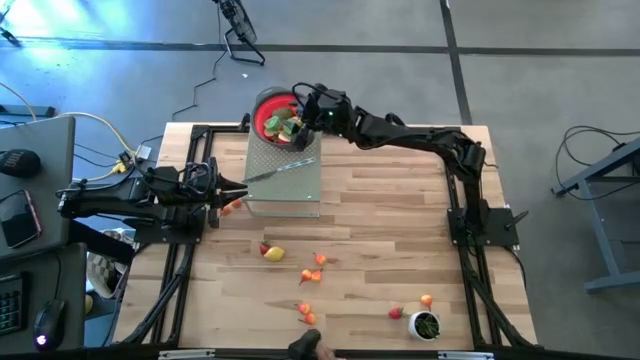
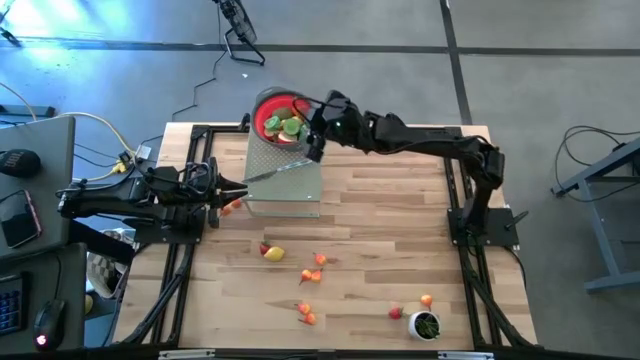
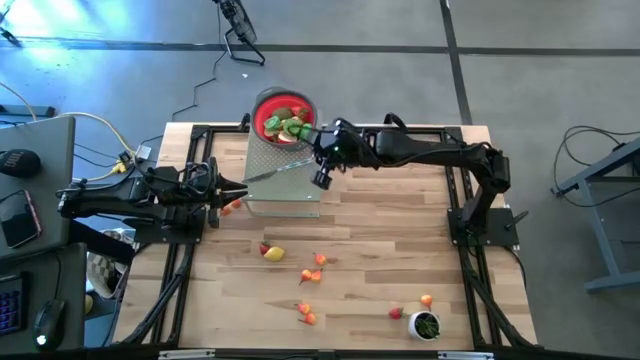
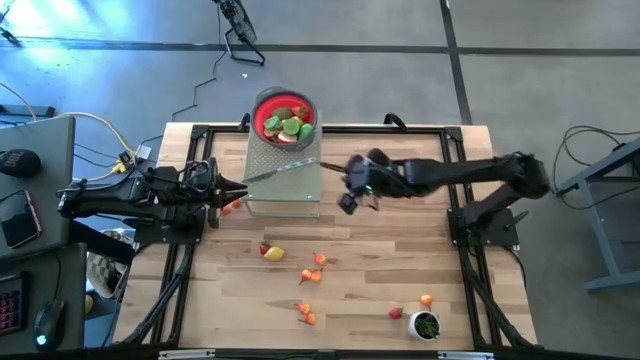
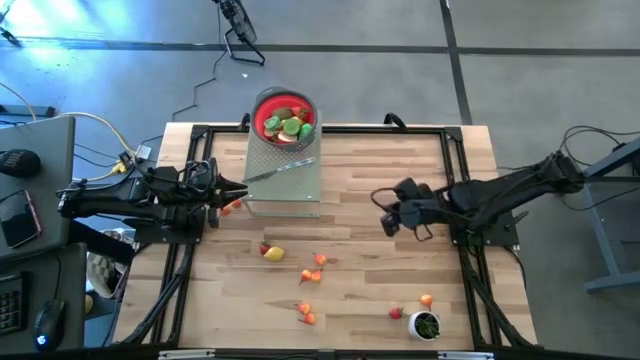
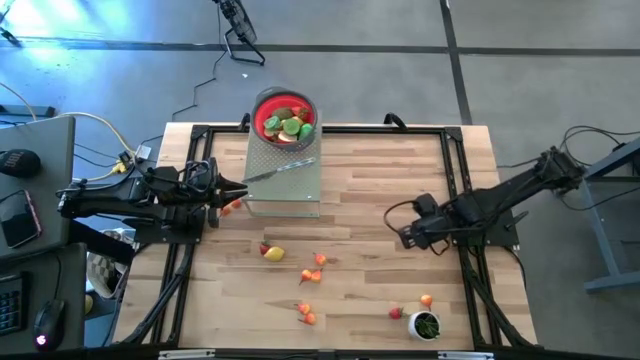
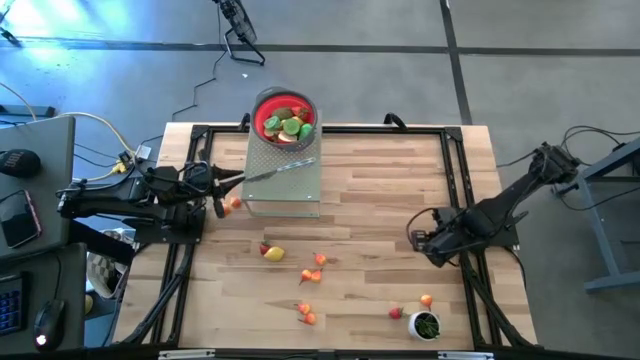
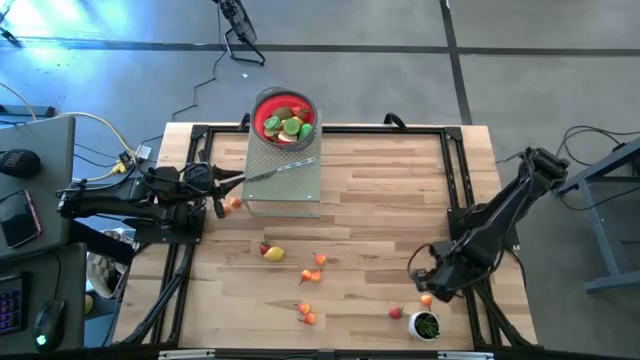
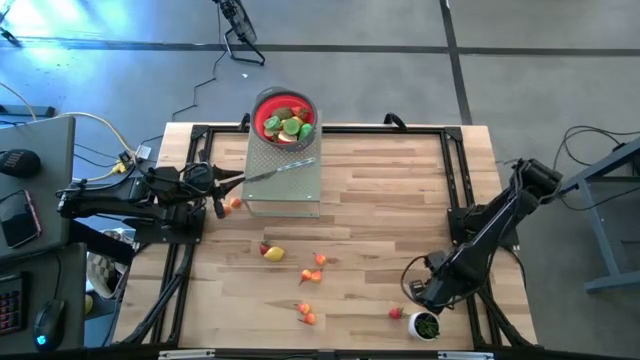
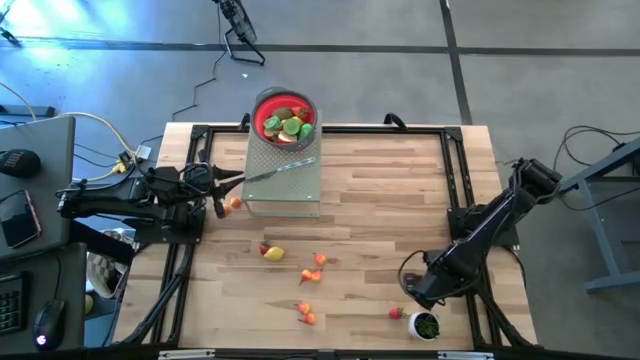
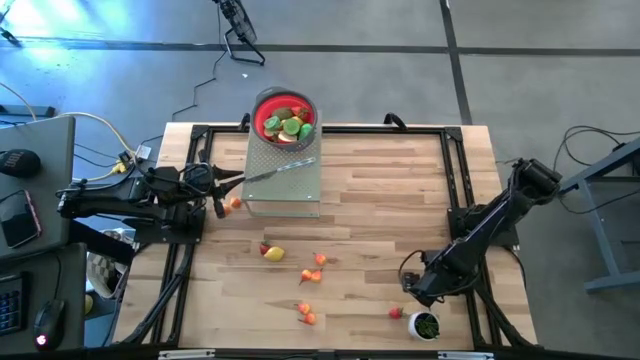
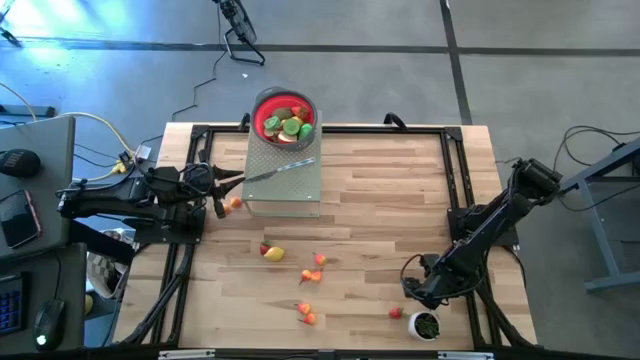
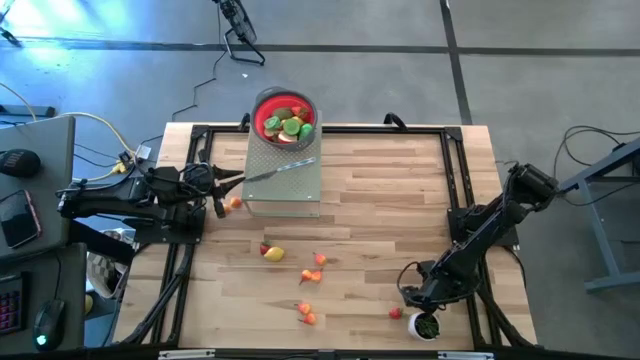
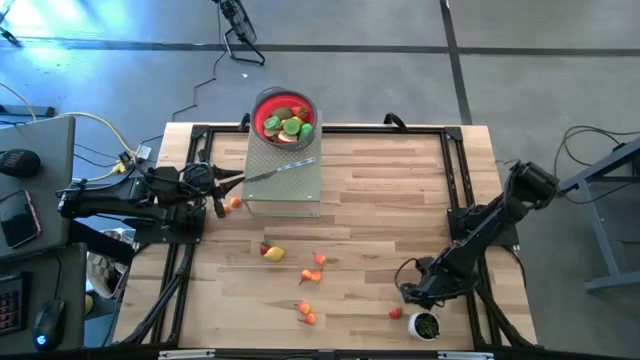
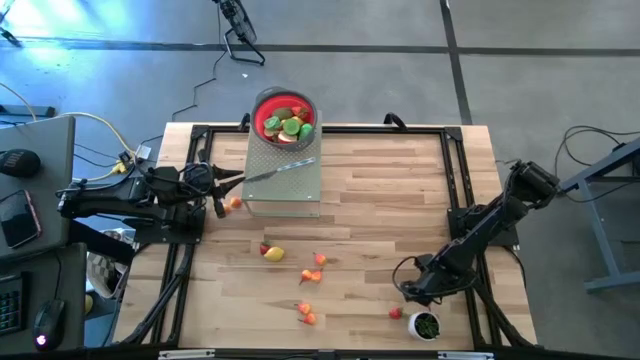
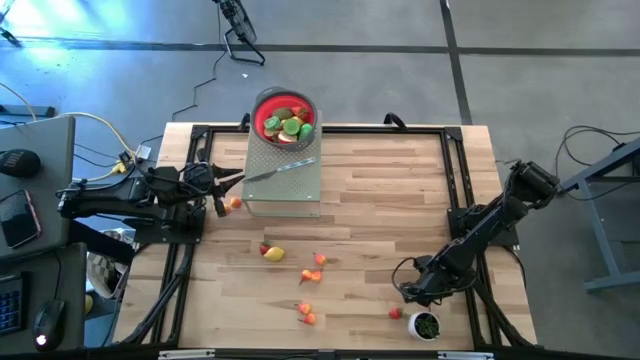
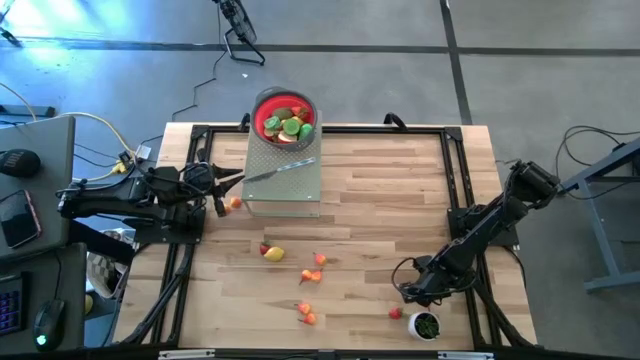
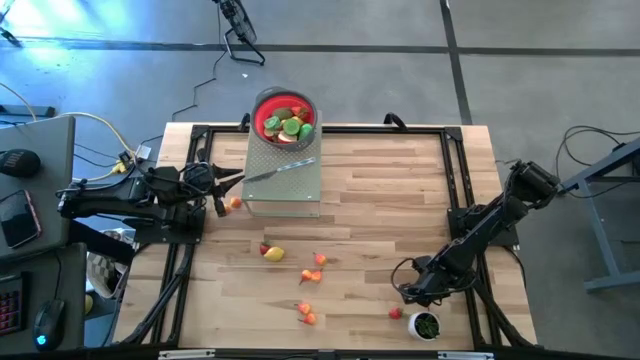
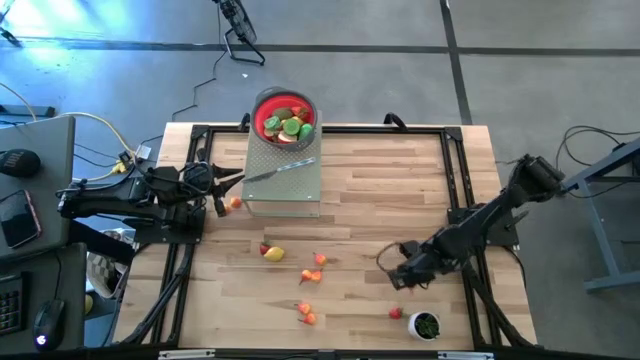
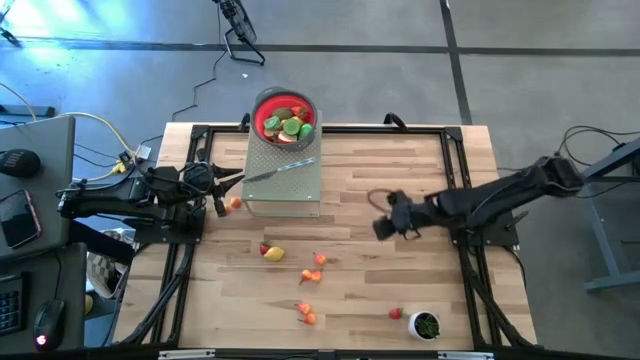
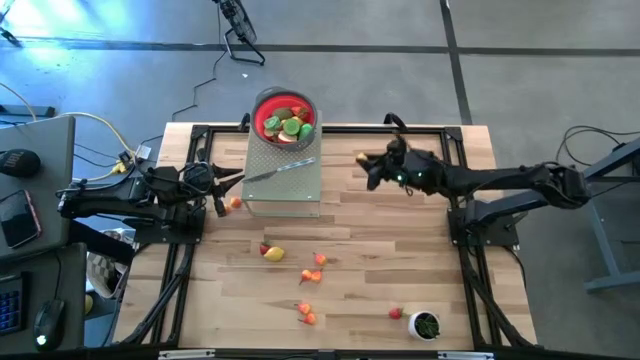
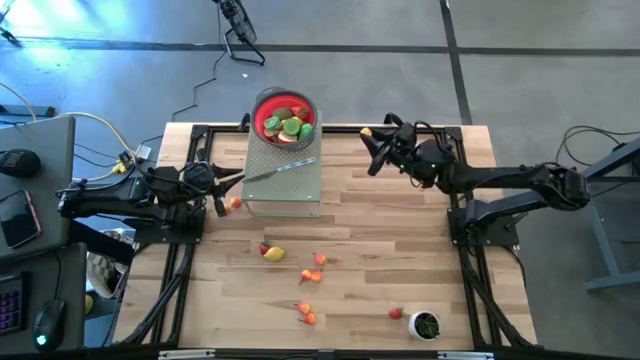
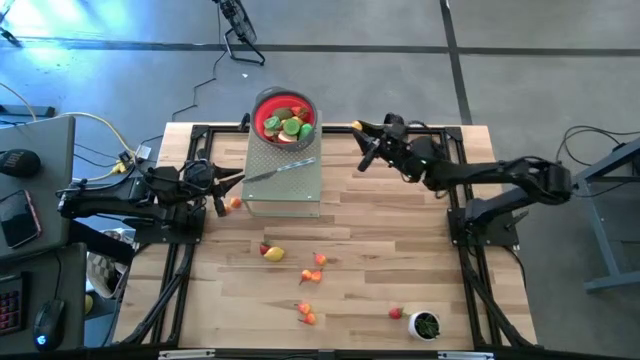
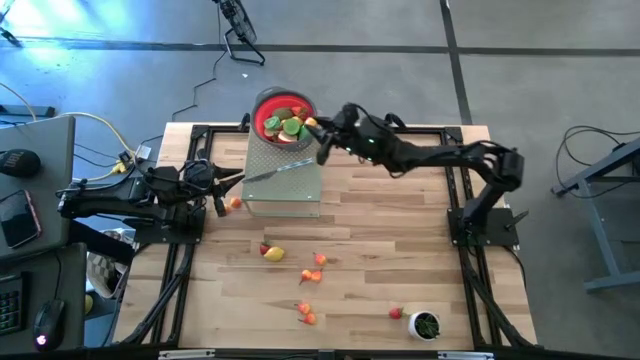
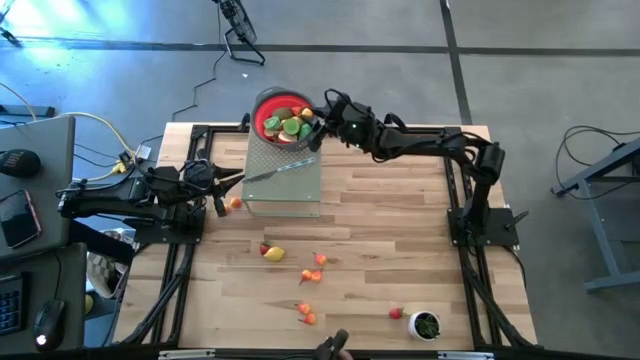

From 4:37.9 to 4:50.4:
Task: Pick & Place Fruit
Put the orange pear into the red strainer on the shelf

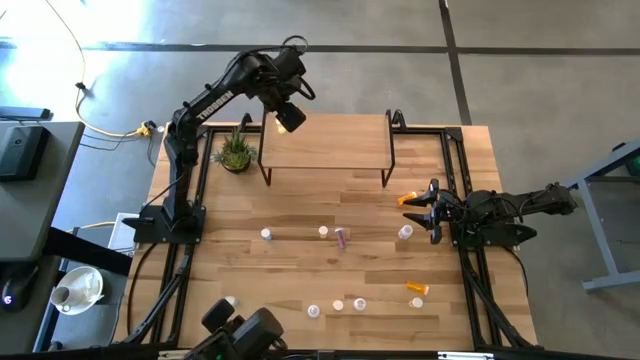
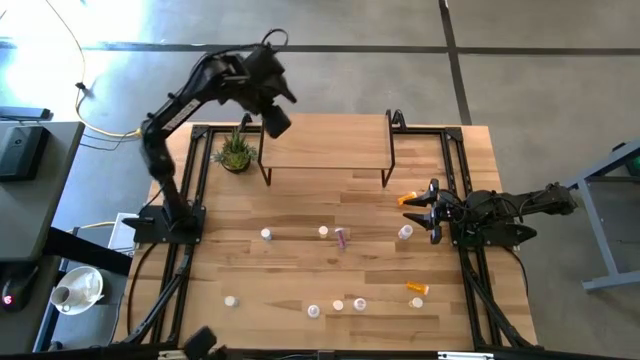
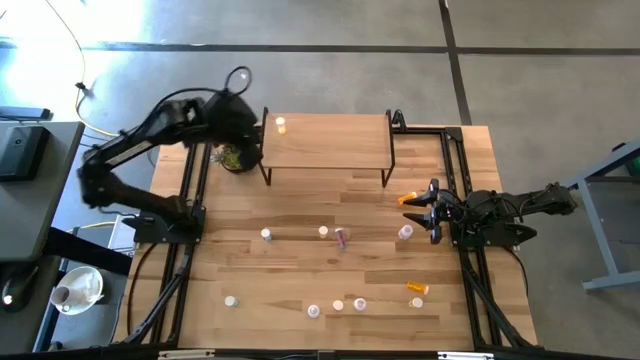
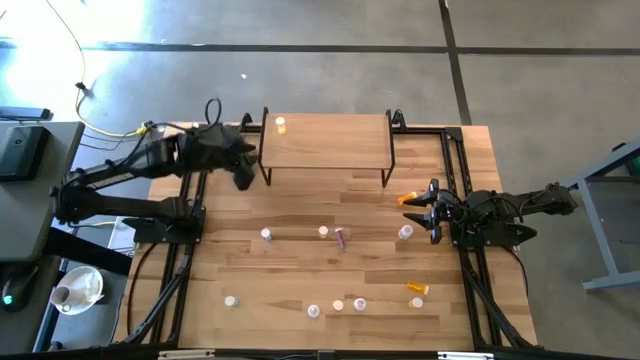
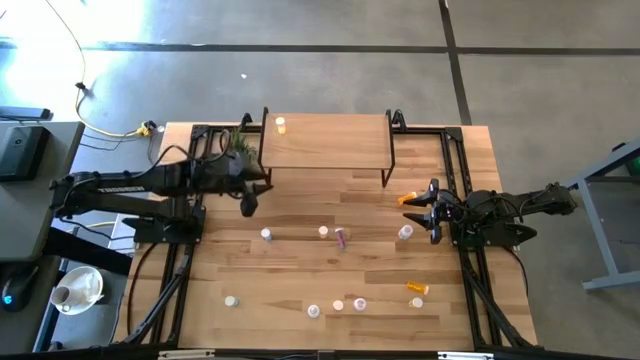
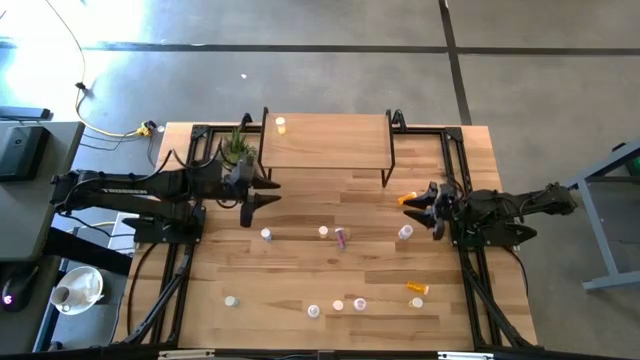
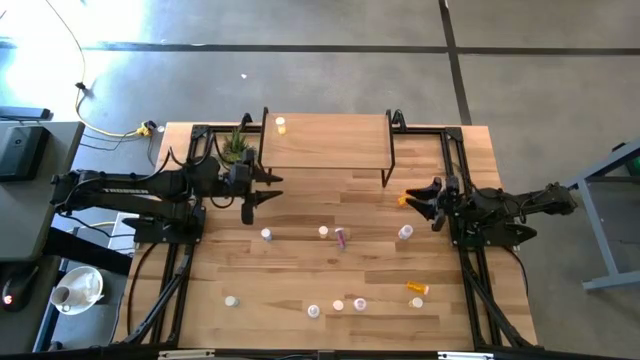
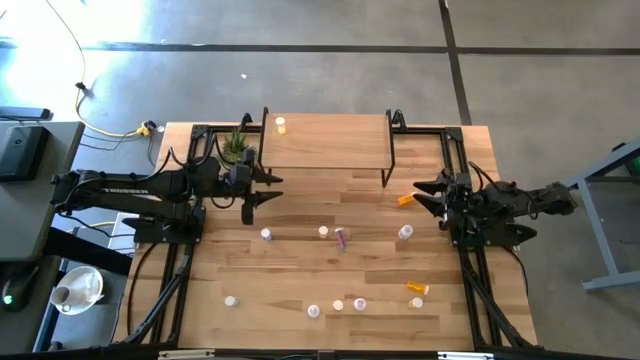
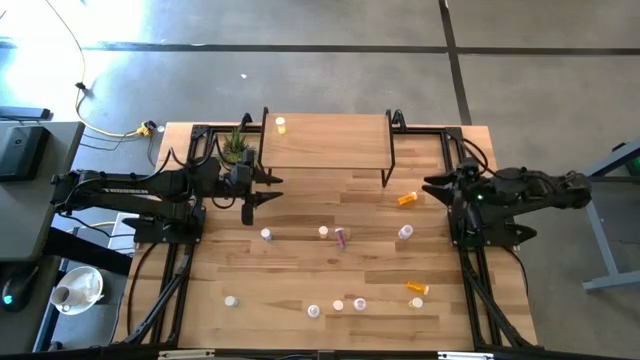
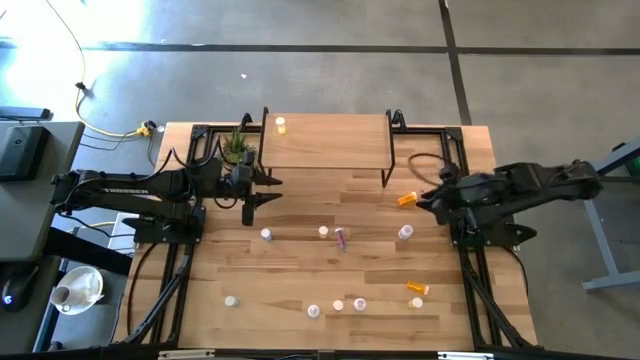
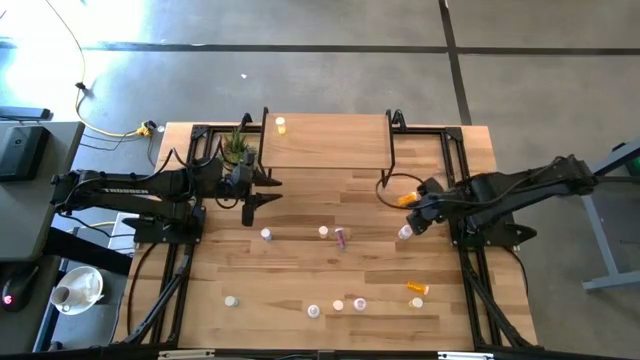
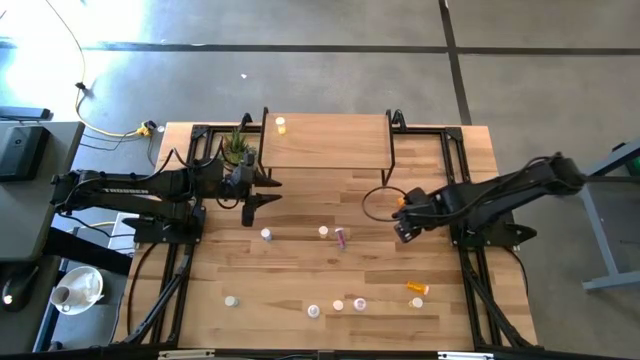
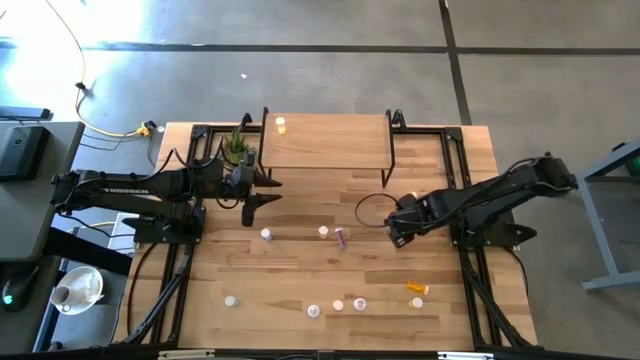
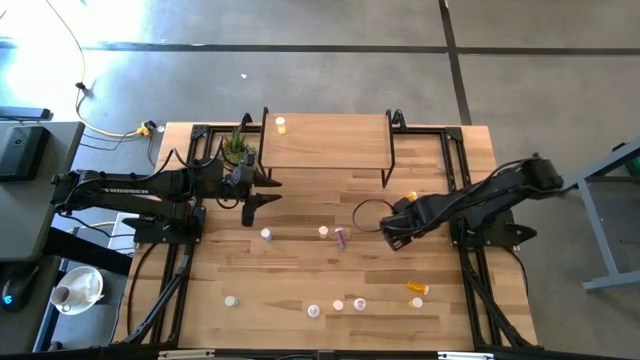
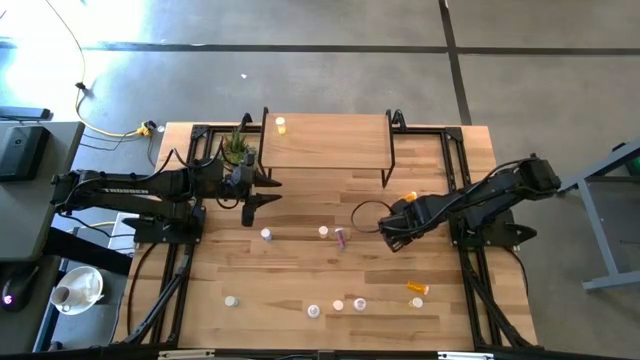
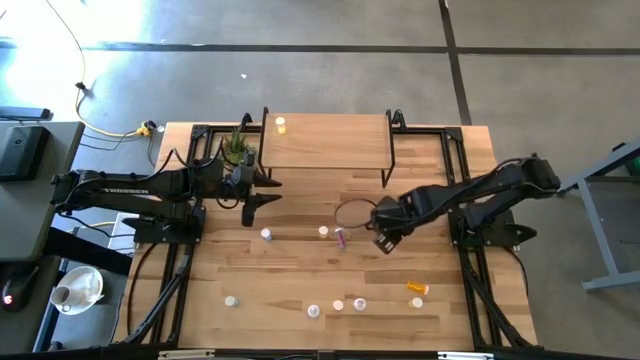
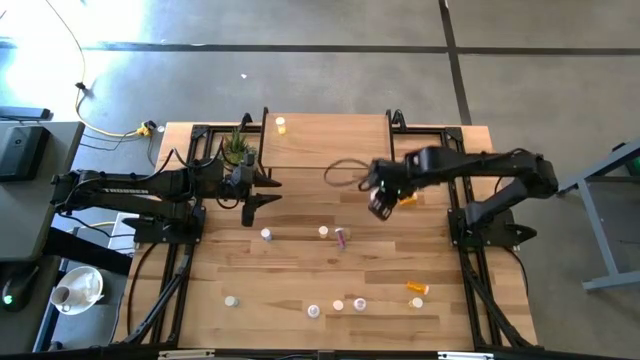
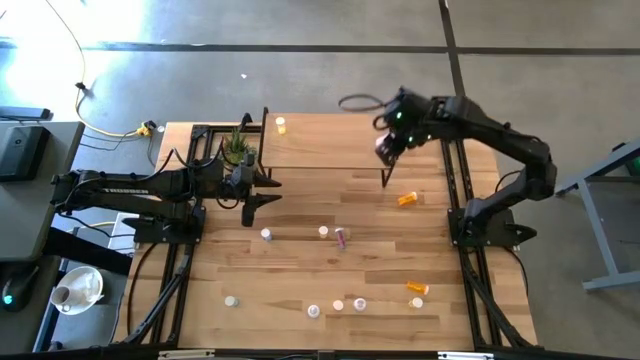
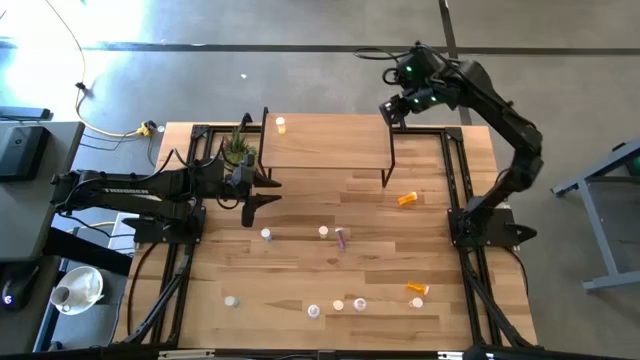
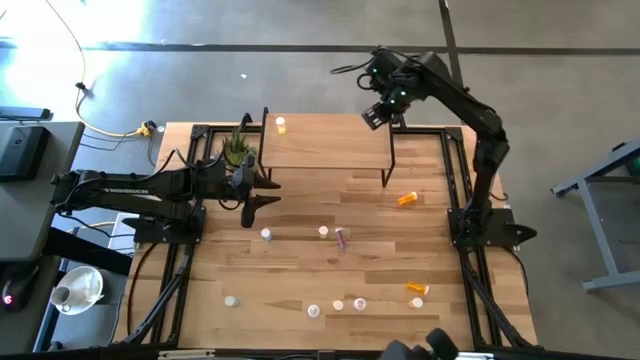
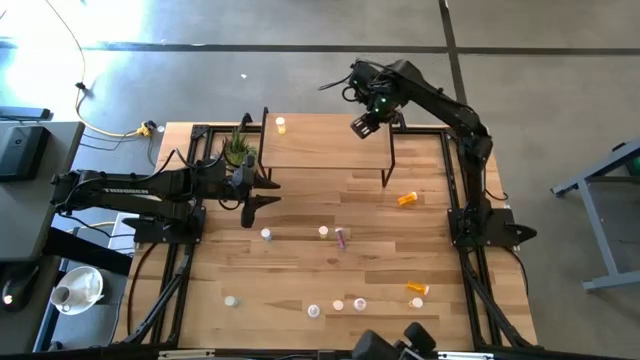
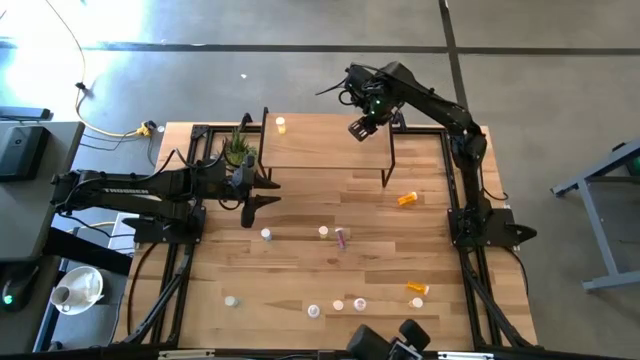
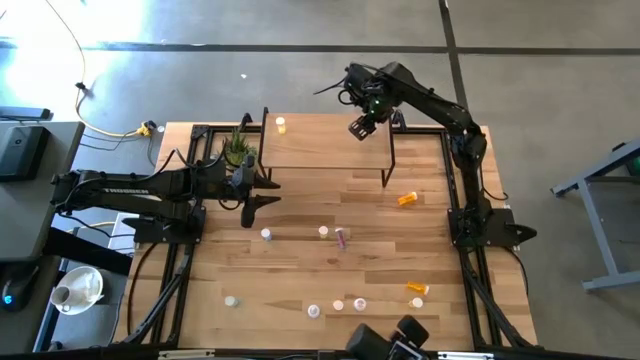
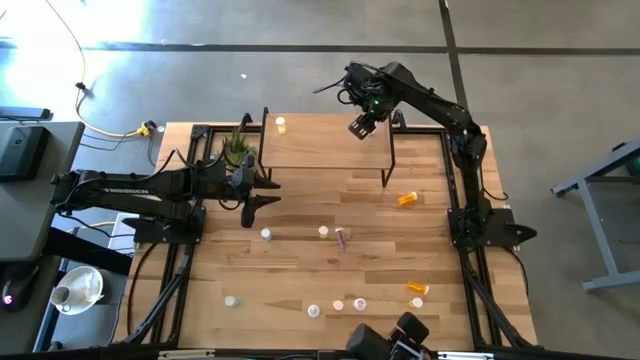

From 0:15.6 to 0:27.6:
Task: Pick and place medicine bottles onto shelf by color
Put the top white pill bottle on the shelf
